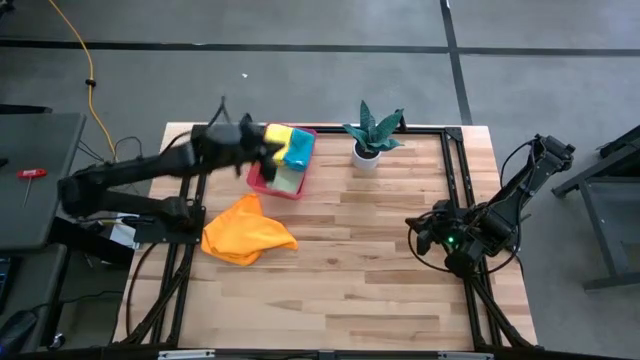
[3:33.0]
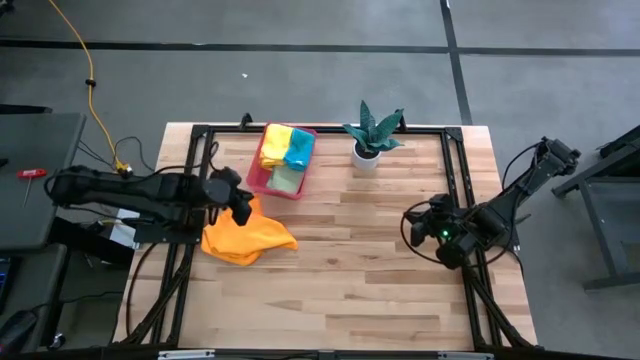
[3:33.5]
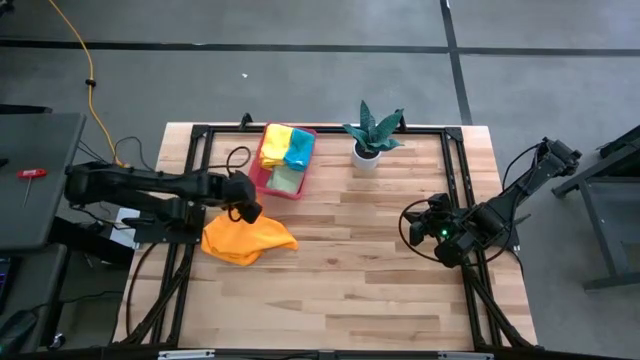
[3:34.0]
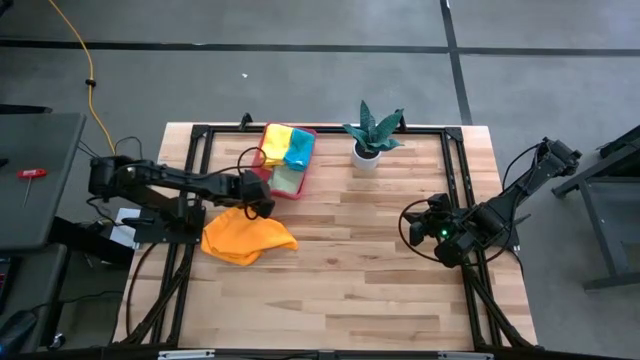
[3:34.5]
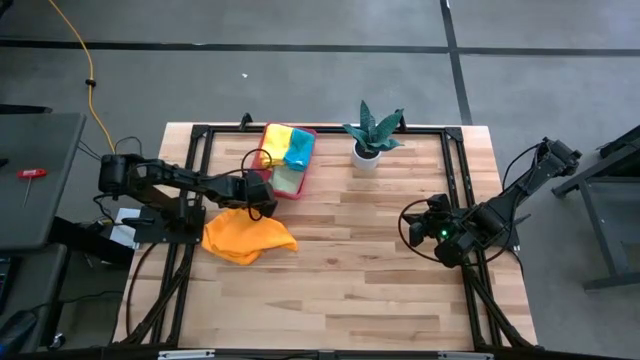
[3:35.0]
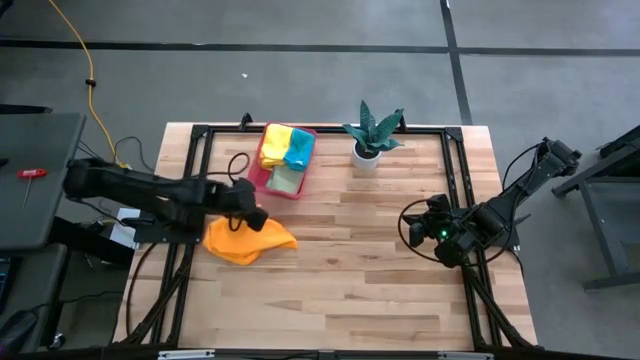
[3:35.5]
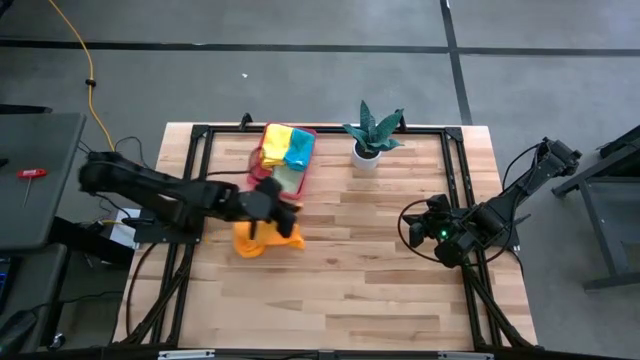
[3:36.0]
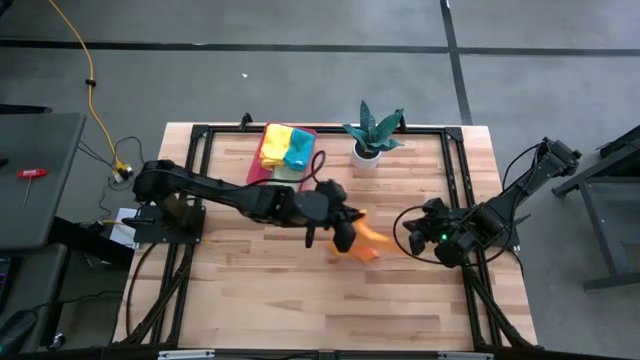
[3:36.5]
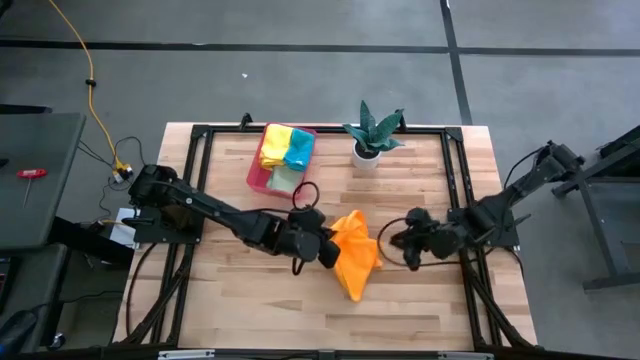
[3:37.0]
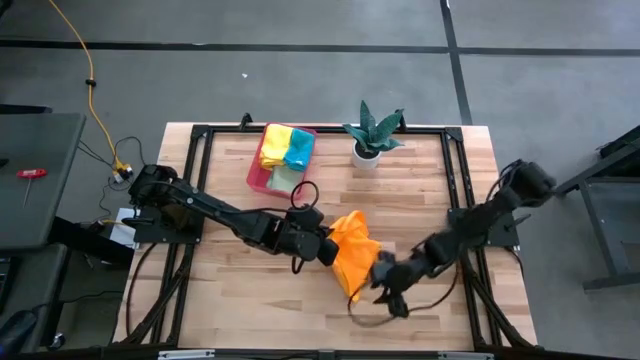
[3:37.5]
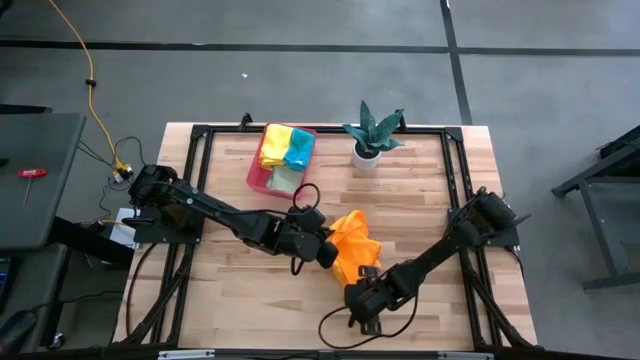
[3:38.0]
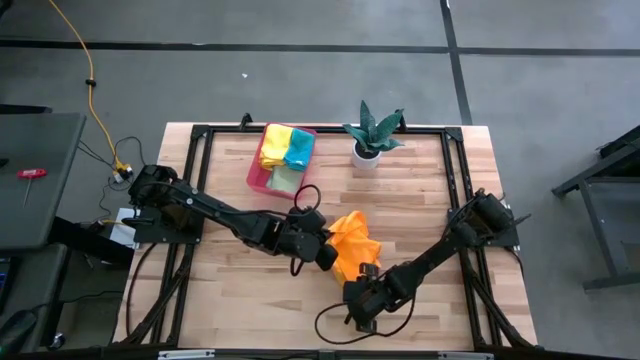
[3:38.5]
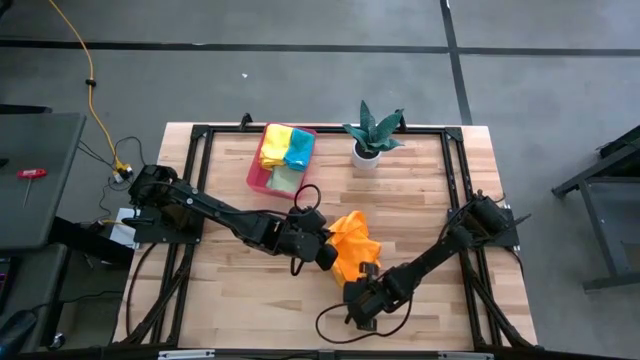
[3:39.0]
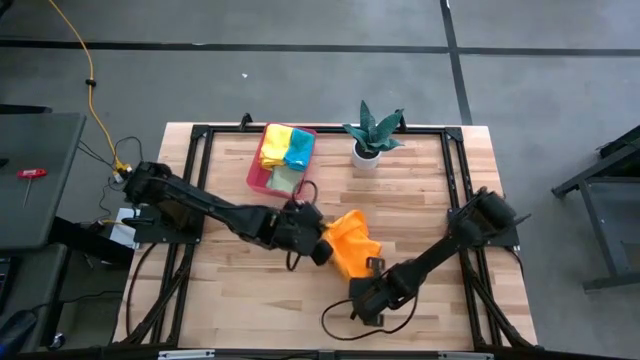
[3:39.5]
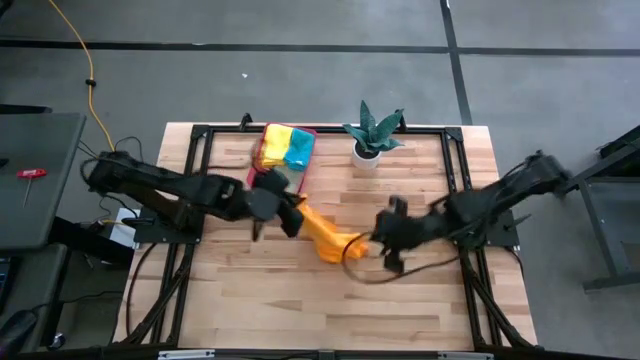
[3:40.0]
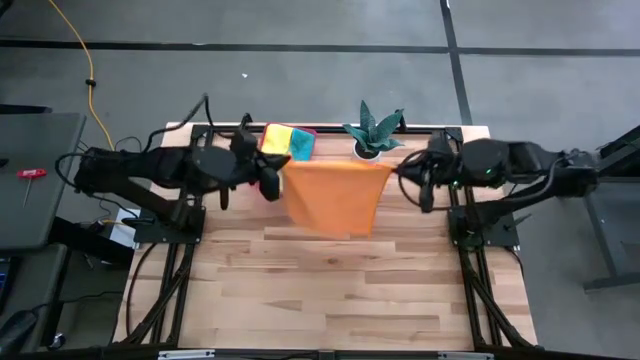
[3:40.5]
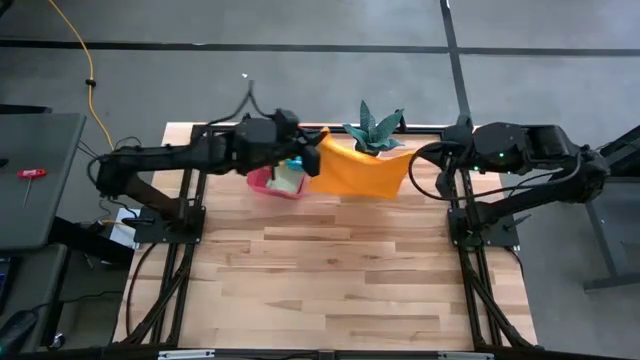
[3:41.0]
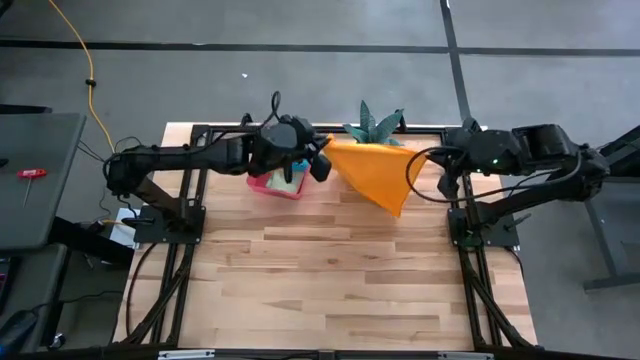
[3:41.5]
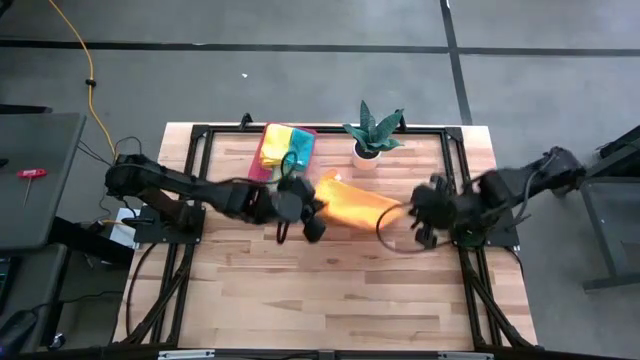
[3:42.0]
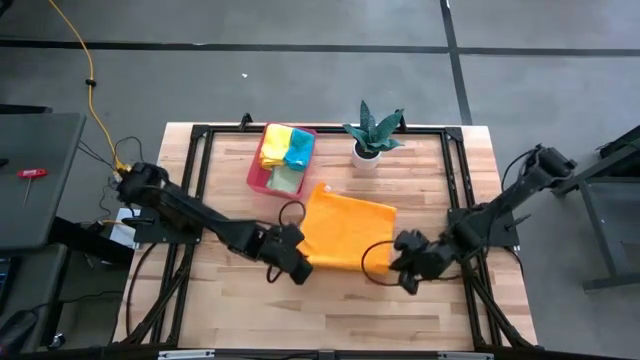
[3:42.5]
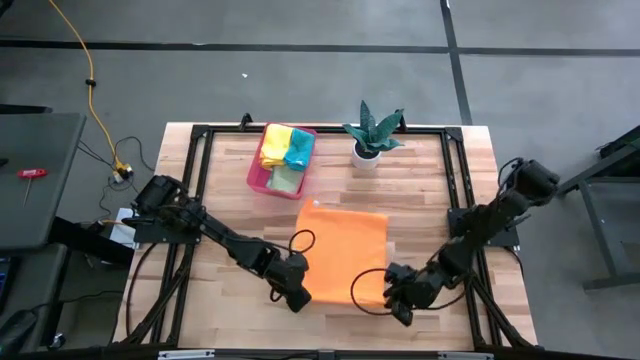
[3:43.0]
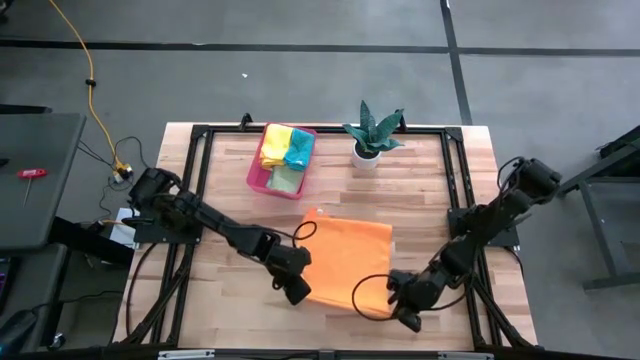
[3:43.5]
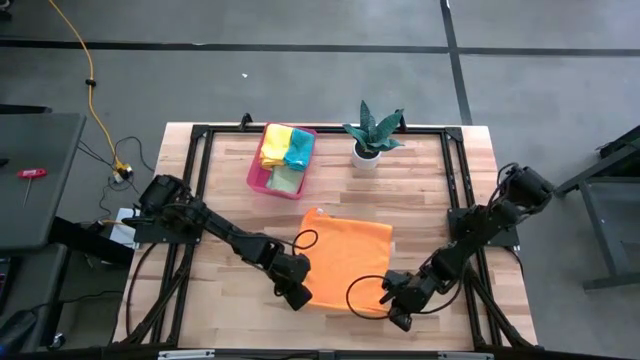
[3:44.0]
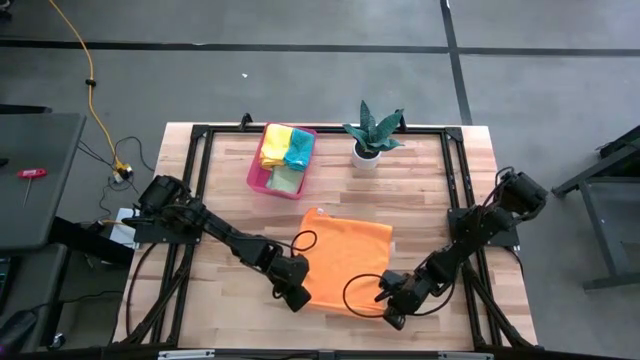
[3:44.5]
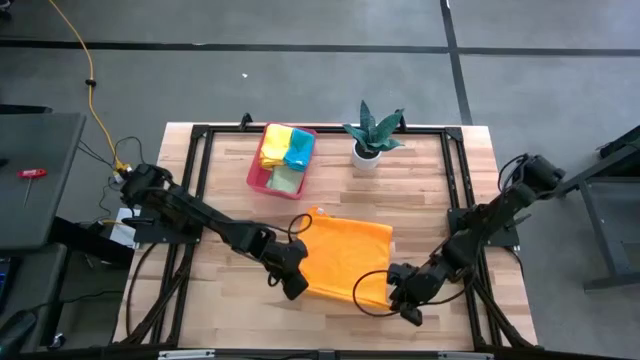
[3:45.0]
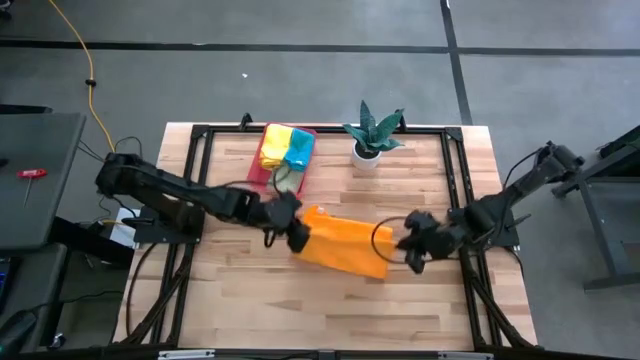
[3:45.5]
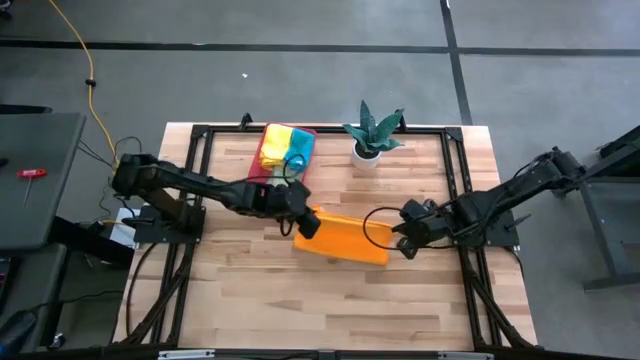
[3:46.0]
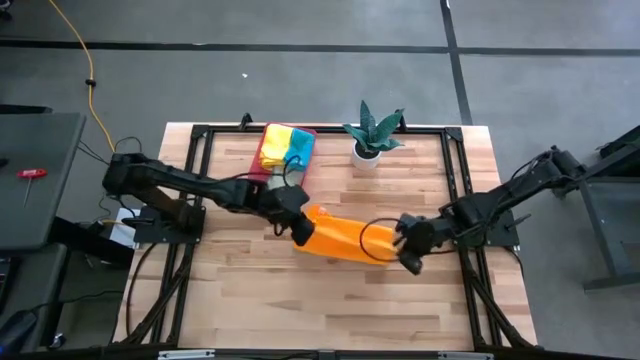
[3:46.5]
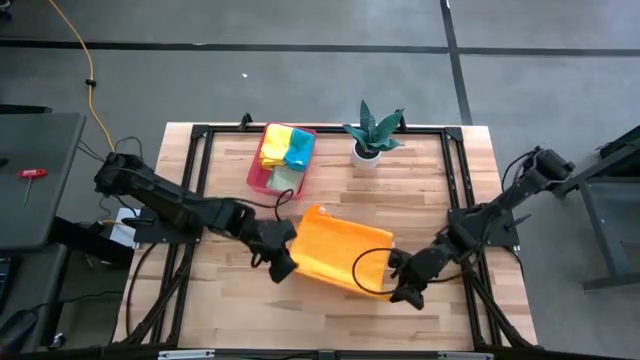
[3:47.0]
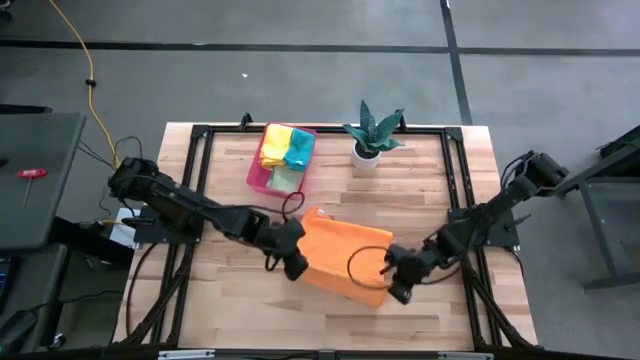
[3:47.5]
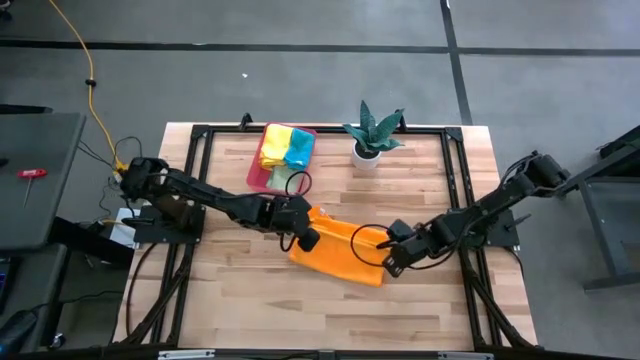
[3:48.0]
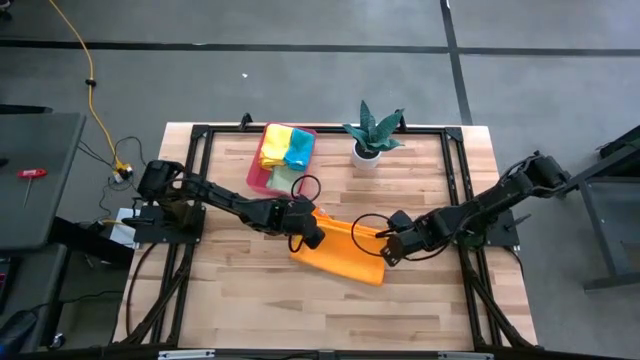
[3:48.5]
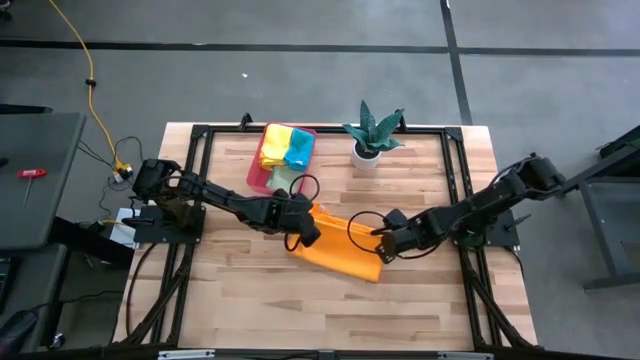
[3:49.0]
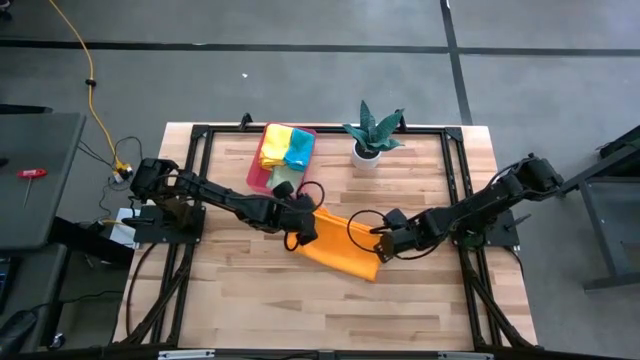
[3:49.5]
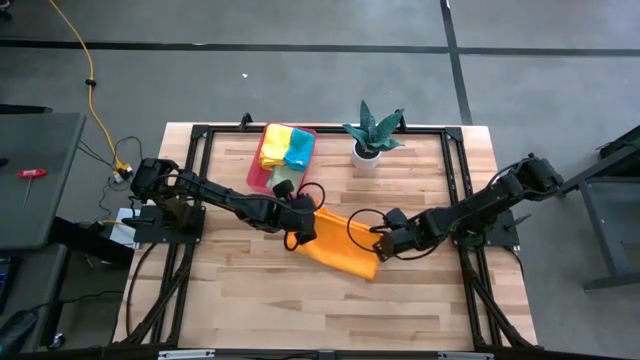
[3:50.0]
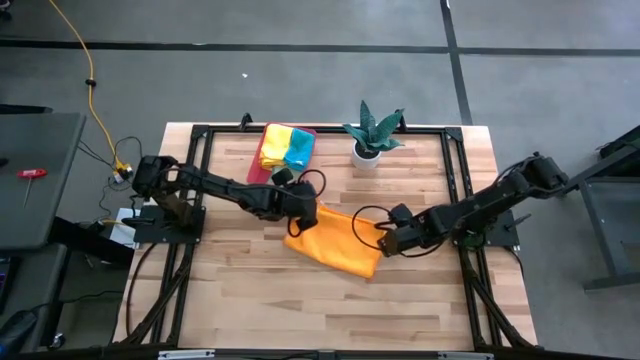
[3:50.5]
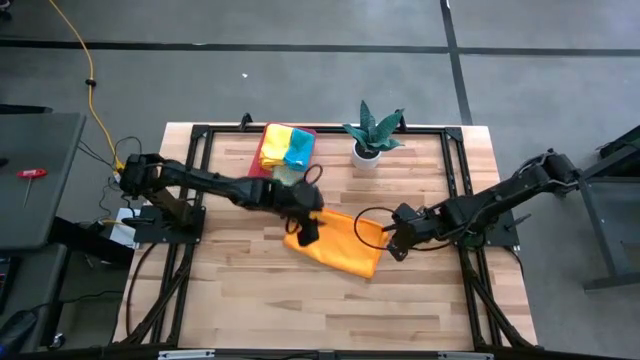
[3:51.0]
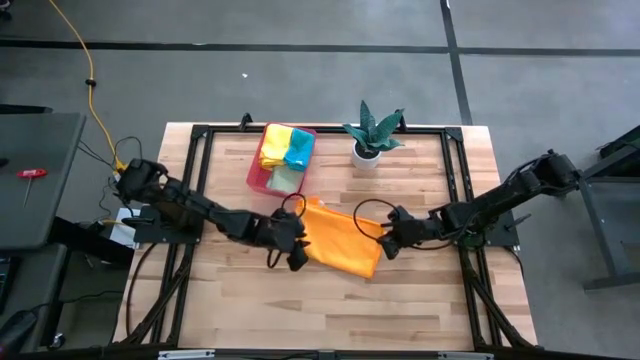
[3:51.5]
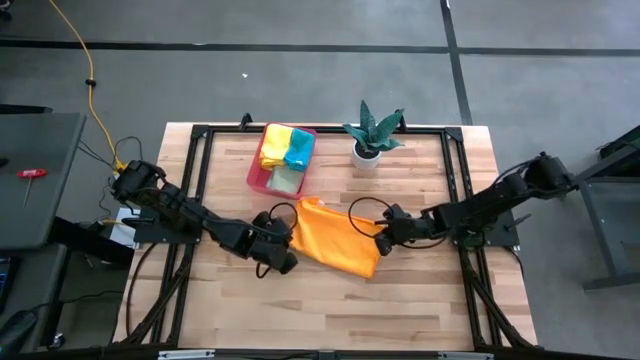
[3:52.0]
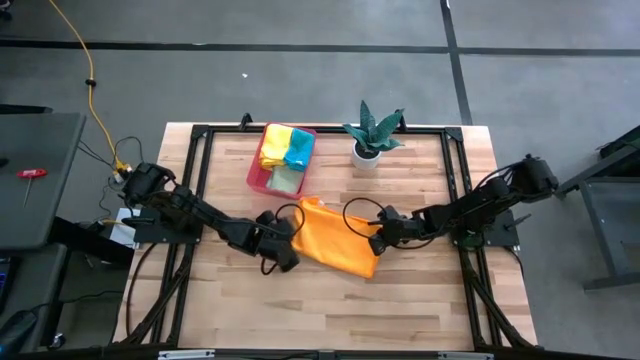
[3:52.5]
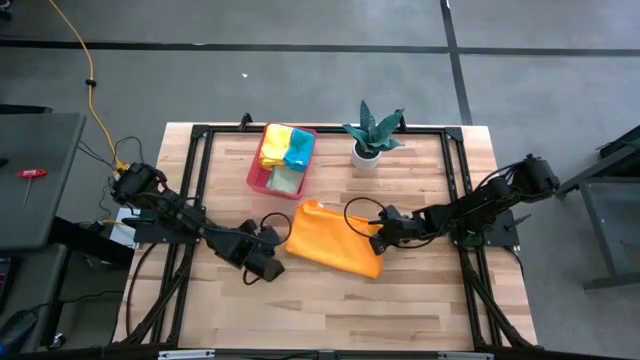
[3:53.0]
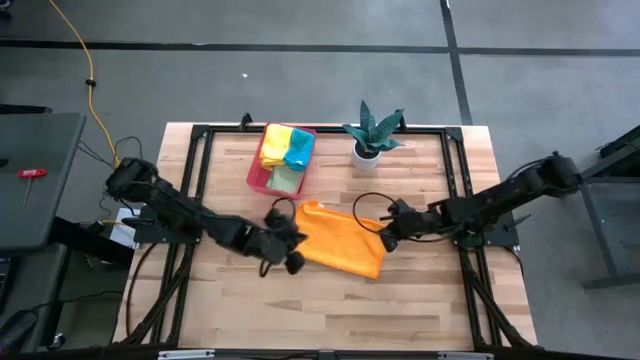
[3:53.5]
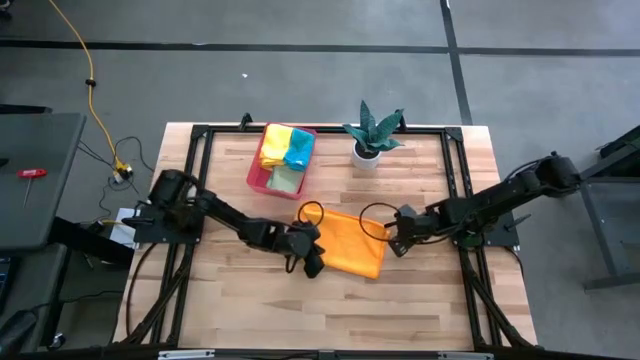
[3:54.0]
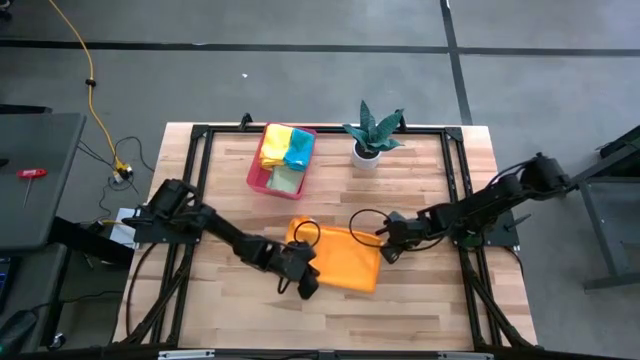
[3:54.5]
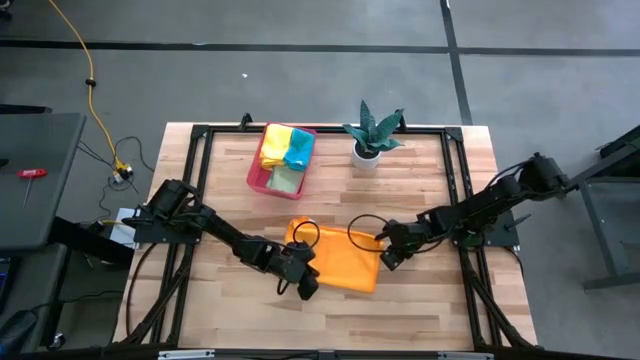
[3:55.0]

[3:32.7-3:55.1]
Task: Fold microfiber towels
Fold the orange microfiber cloth
